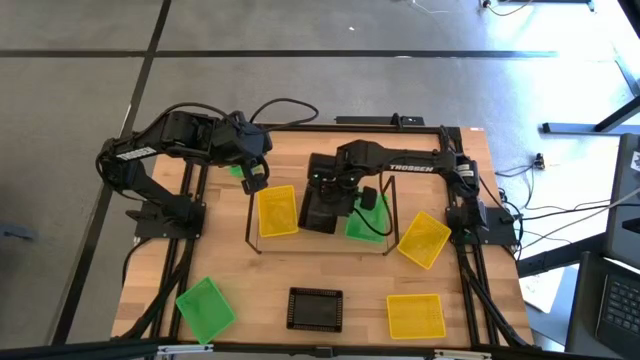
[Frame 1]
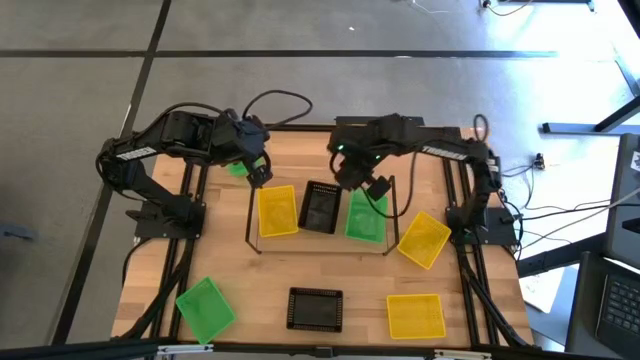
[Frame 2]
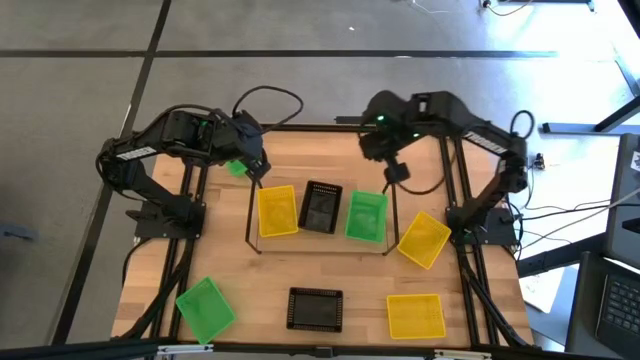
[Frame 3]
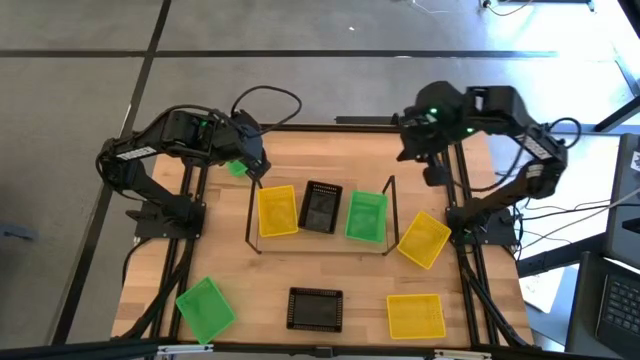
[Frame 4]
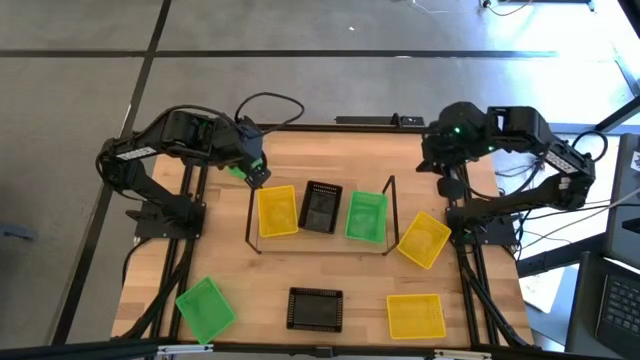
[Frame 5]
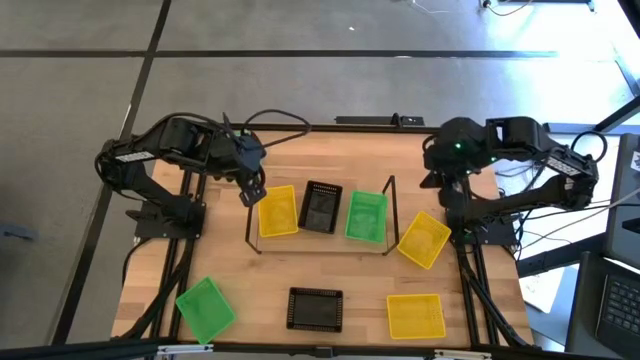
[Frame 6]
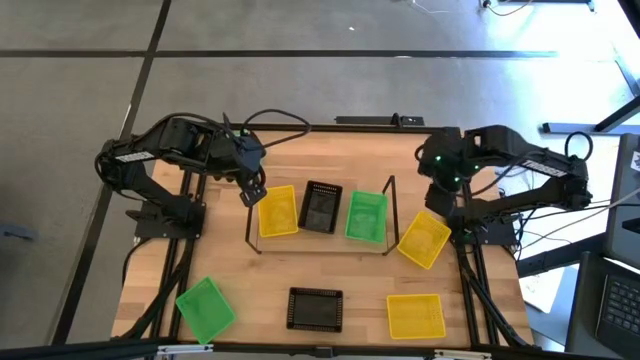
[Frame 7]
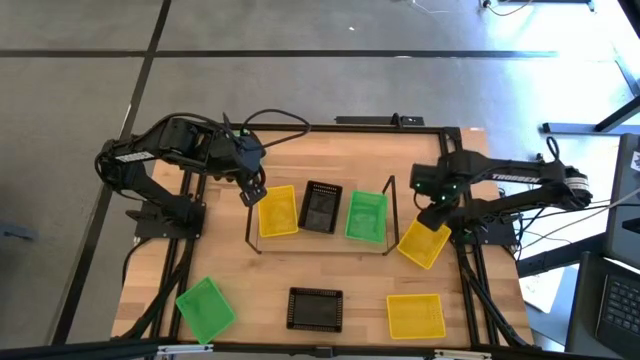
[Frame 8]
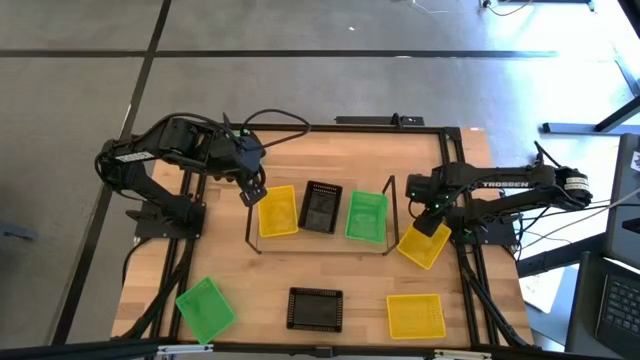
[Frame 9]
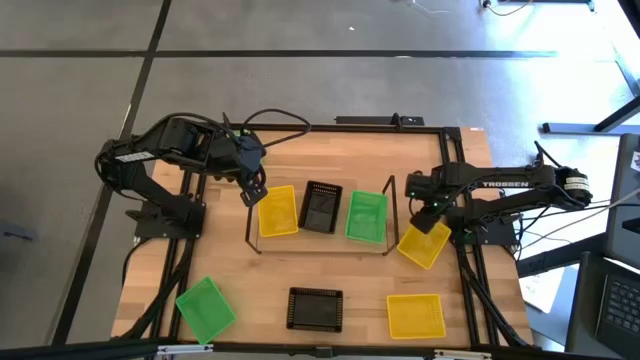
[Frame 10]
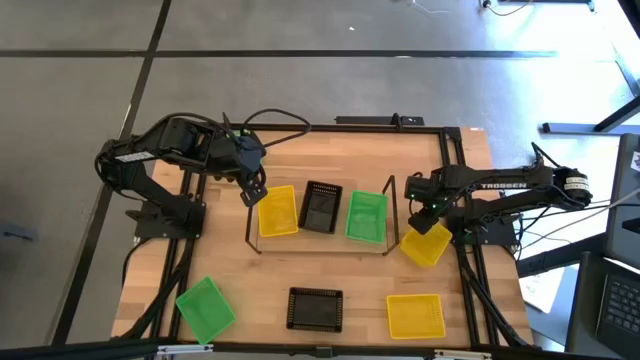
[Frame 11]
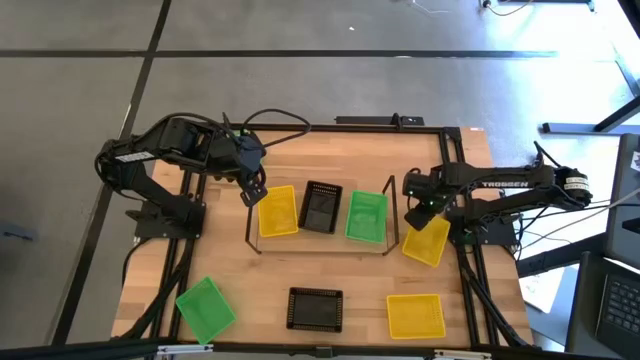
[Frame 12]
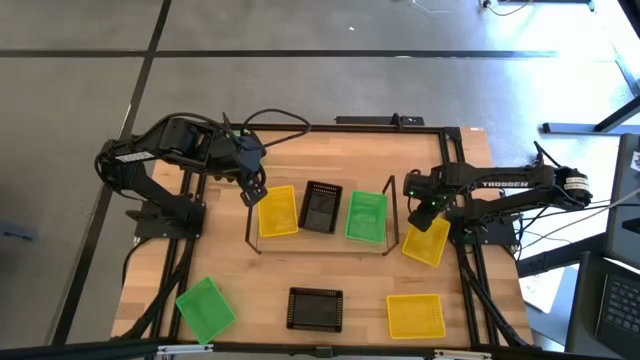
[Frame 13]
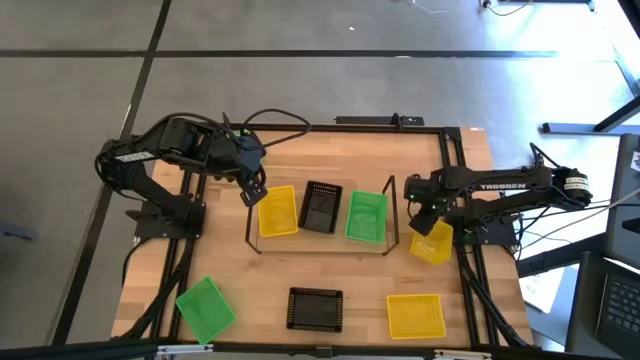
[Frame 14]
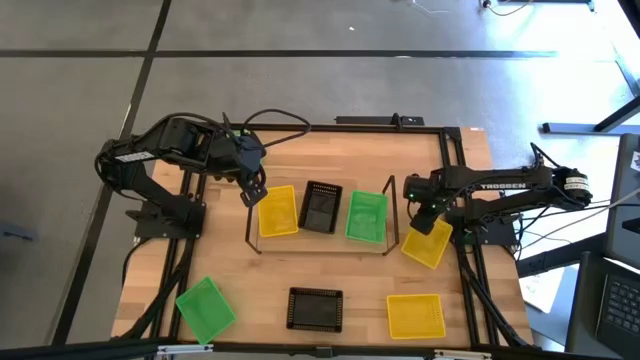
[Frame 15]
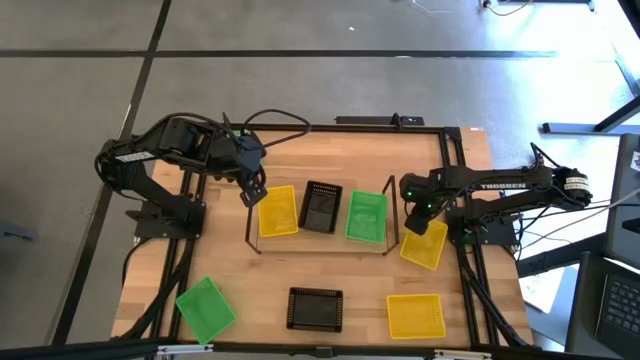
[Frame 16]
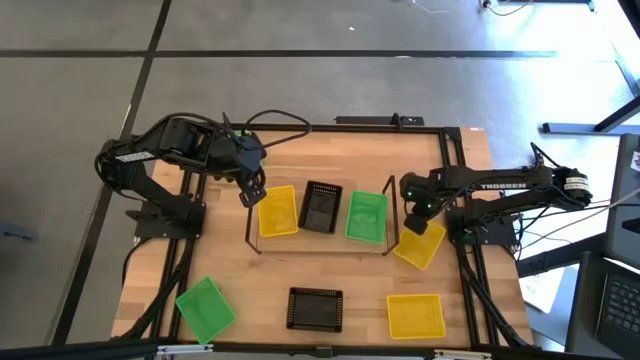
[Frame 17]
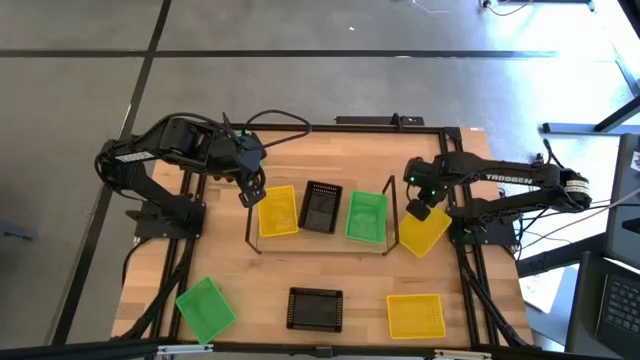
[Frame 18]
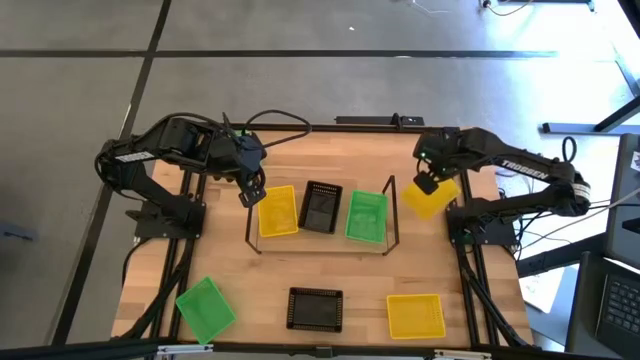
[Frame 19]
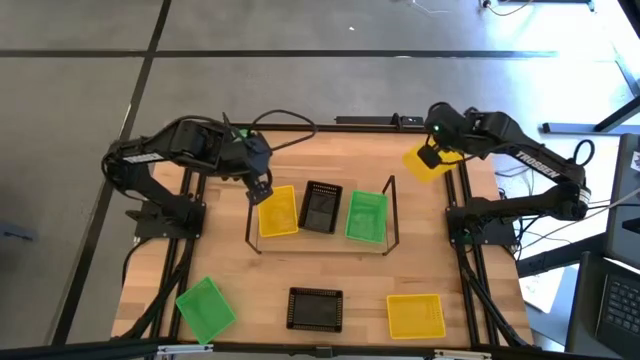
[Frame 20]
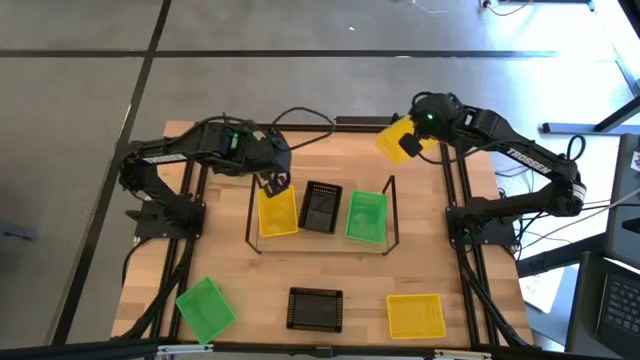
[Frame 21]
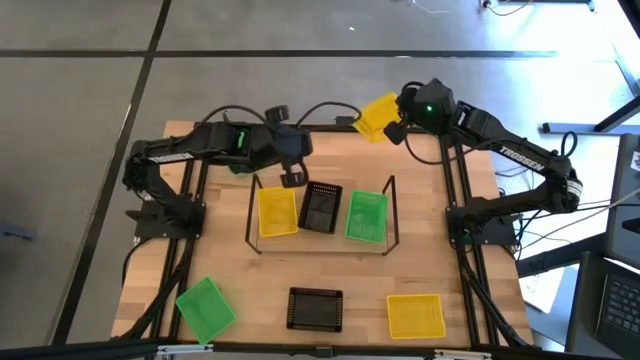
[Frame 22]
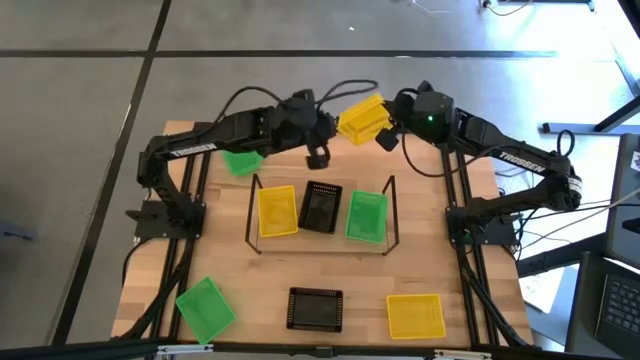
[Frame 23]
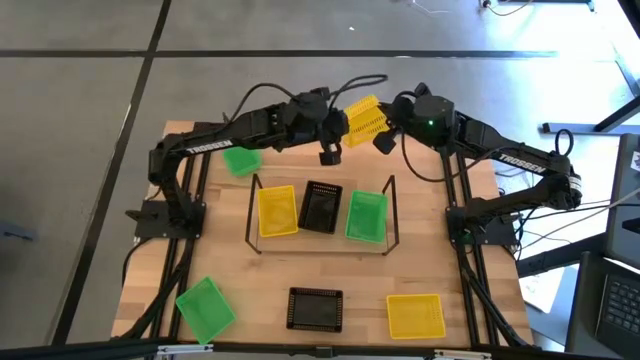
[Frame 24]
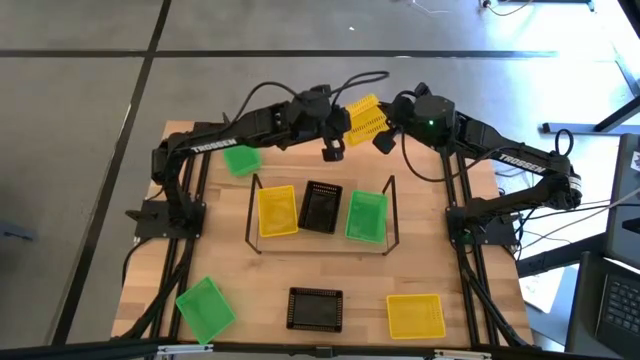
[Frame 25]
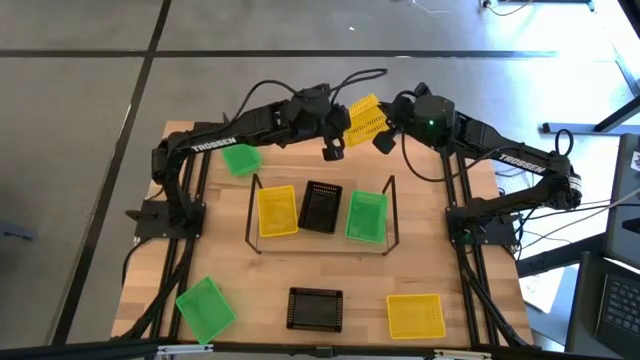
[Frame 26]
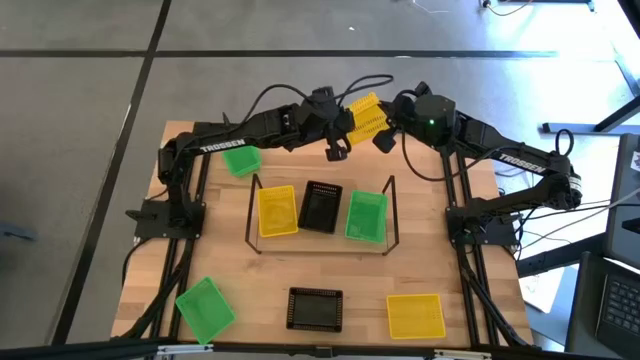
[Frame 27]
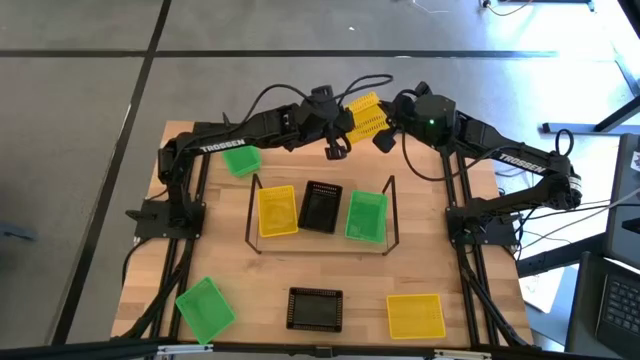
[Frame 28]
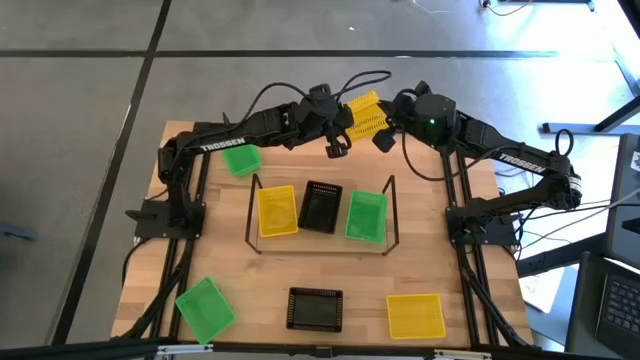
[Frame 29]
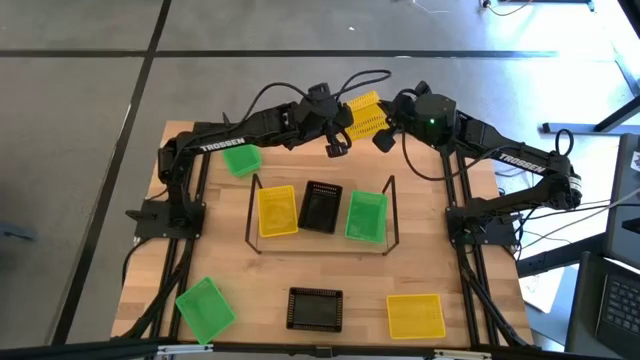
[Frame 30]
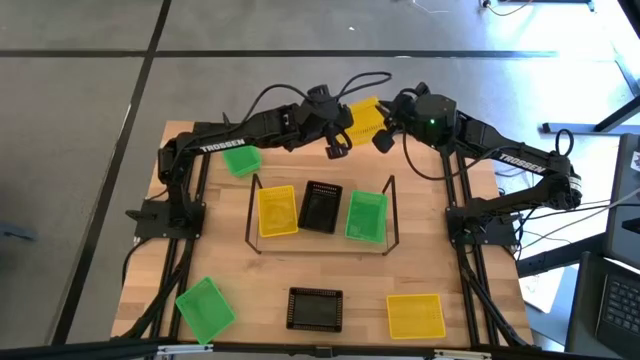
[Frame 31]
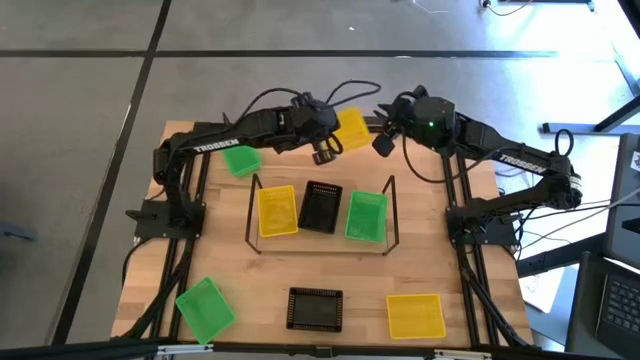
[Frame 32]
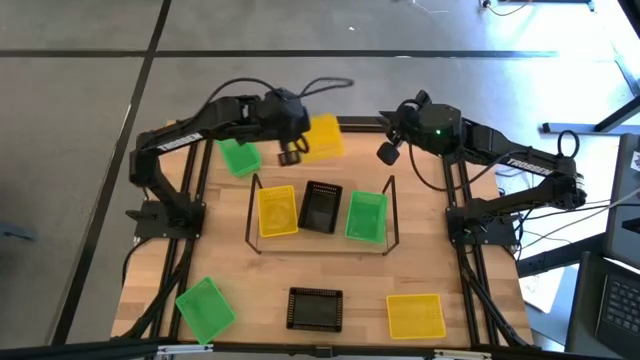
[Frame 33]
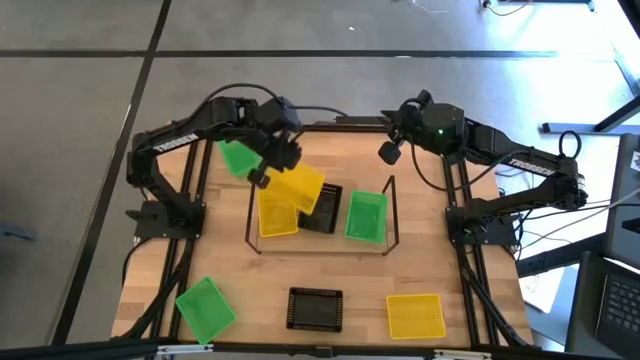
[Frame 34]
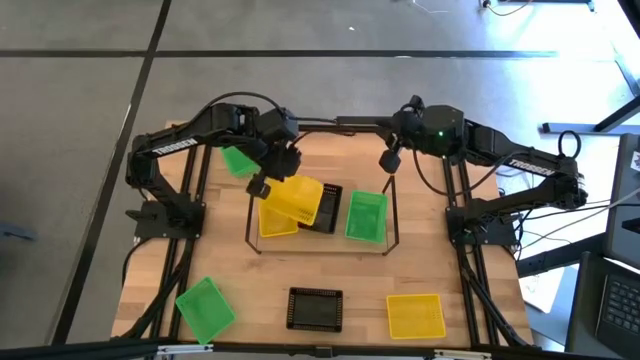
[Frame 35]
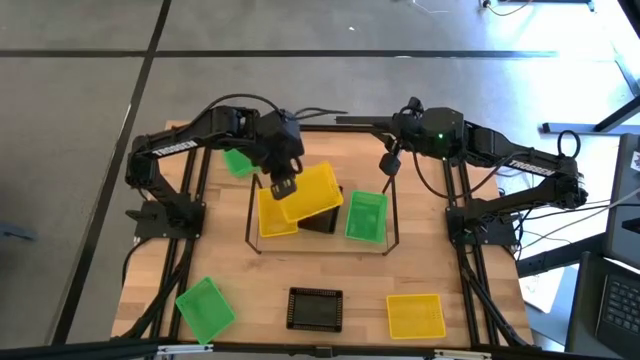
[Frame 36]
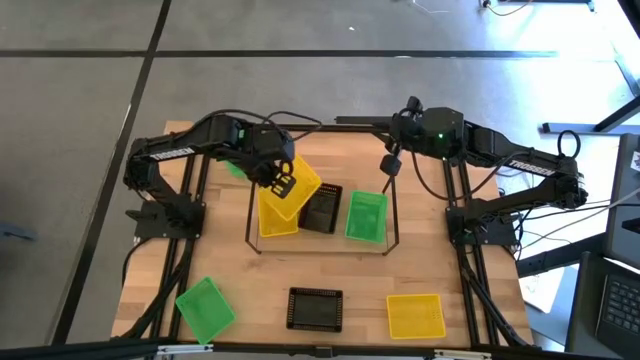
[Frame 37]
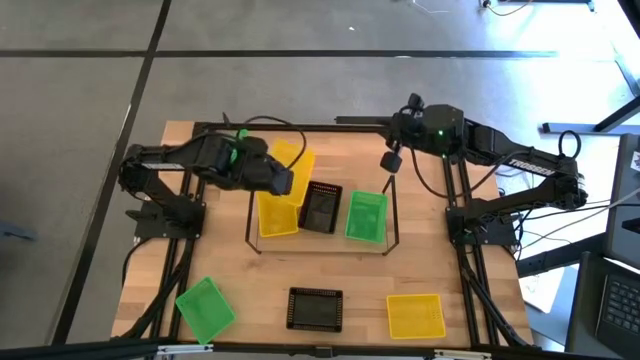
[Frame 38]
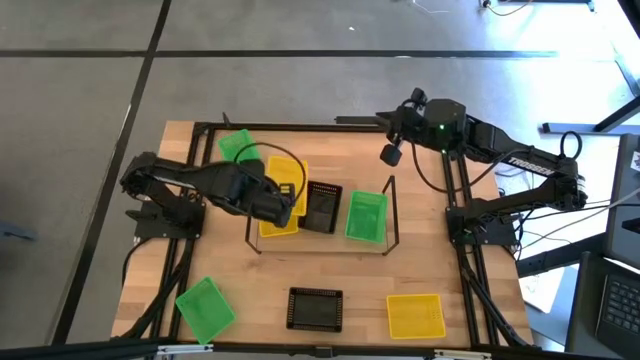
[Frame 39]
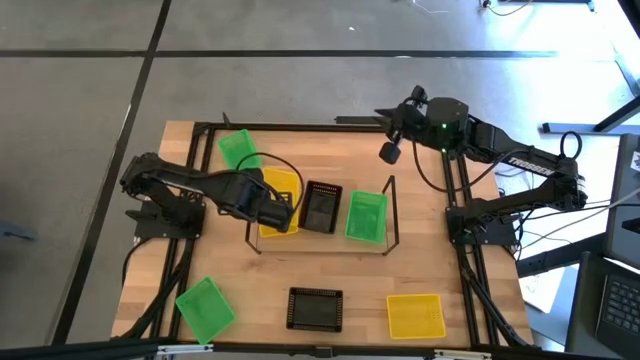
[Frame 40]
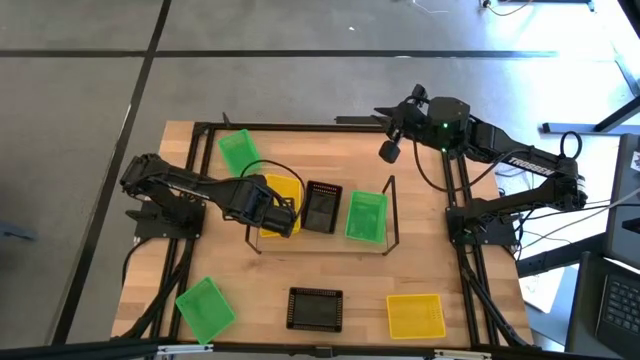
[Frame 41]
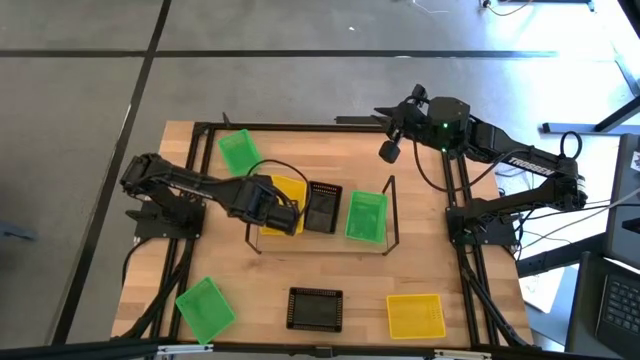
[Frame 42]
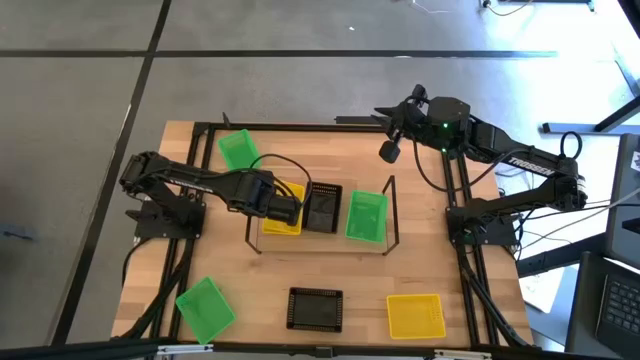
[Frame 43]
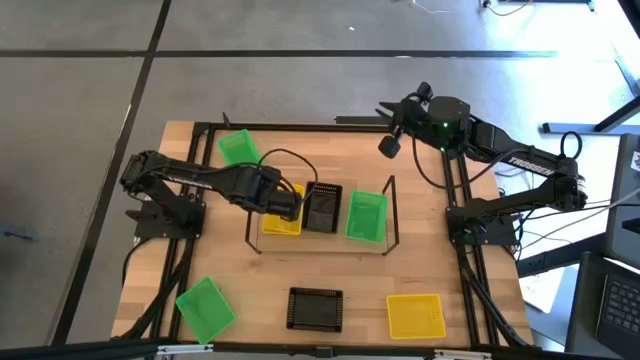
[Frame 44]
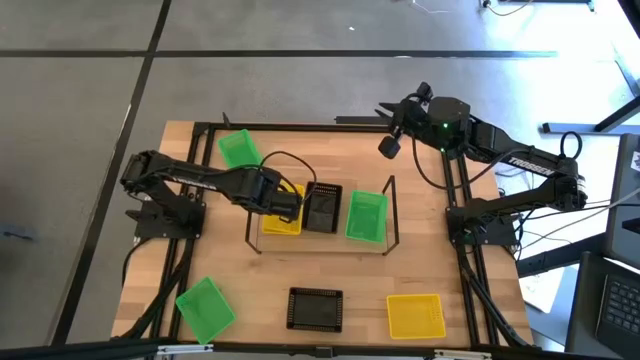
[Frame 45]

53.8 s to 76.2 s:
Task: Stack baskets on shelf by color
Stack the top yellow bin on top of the yellow bin on the shelf
